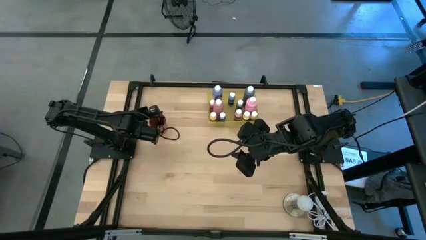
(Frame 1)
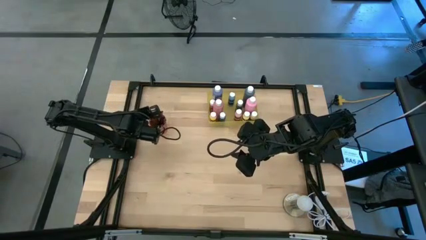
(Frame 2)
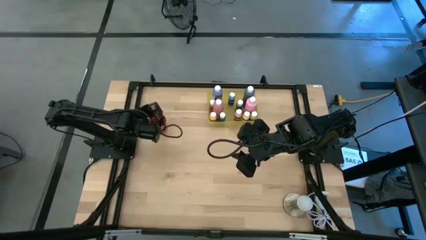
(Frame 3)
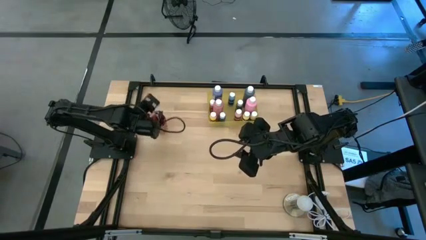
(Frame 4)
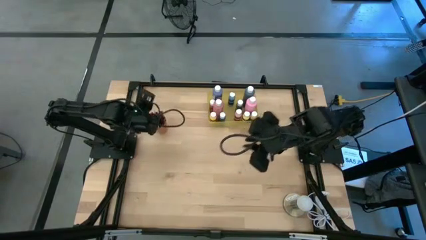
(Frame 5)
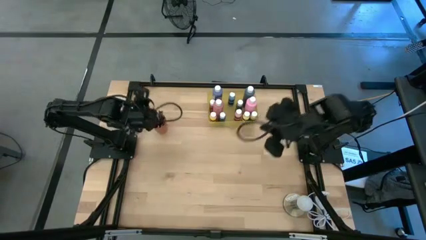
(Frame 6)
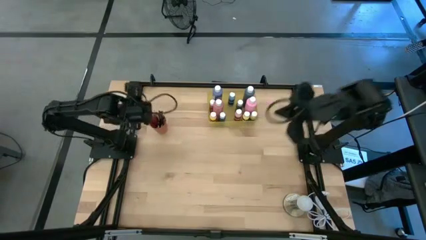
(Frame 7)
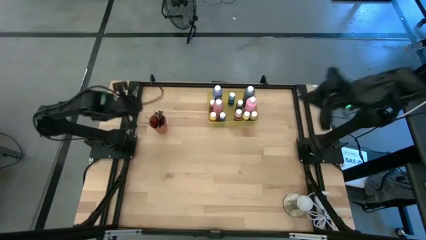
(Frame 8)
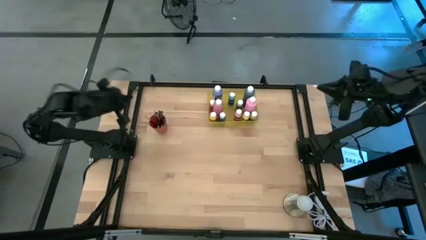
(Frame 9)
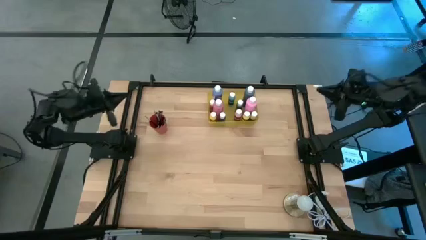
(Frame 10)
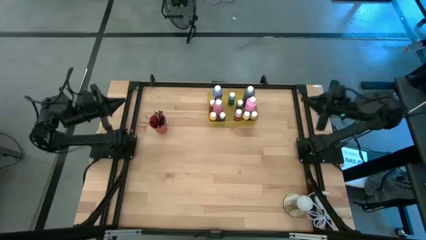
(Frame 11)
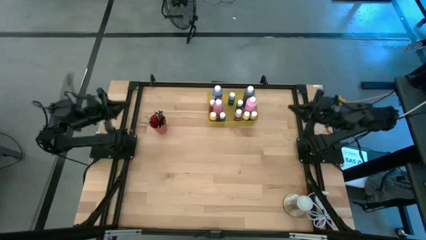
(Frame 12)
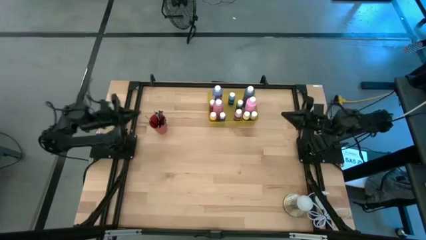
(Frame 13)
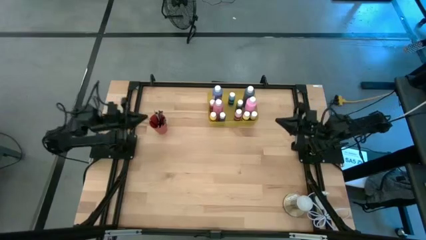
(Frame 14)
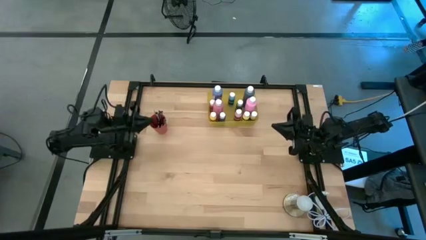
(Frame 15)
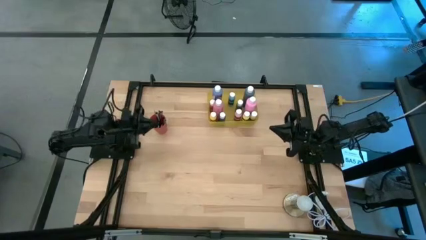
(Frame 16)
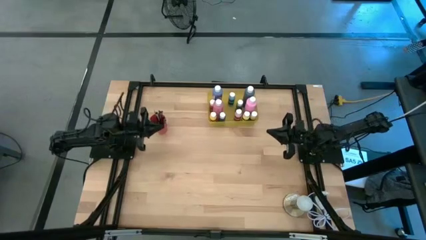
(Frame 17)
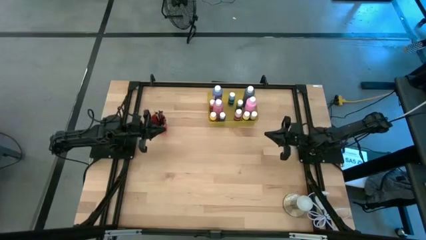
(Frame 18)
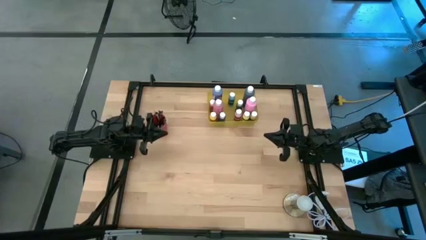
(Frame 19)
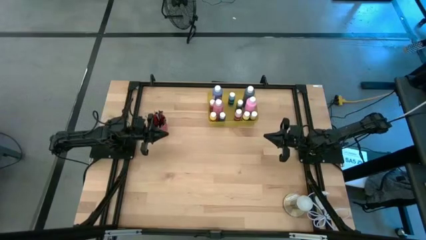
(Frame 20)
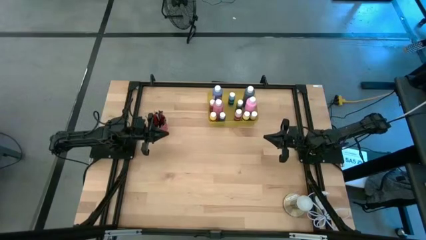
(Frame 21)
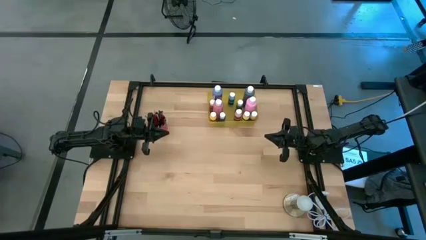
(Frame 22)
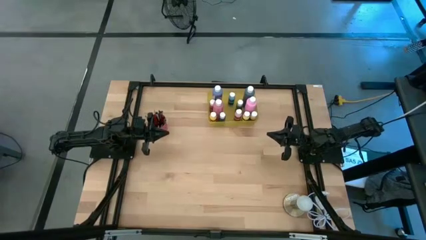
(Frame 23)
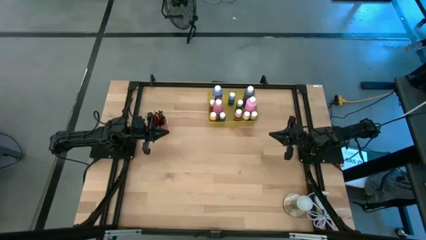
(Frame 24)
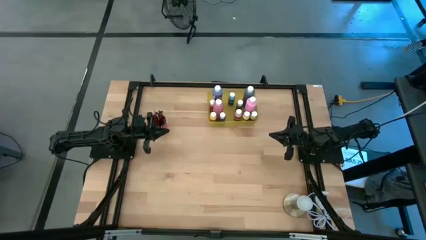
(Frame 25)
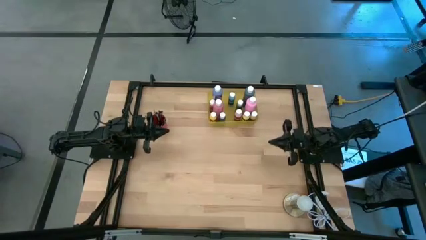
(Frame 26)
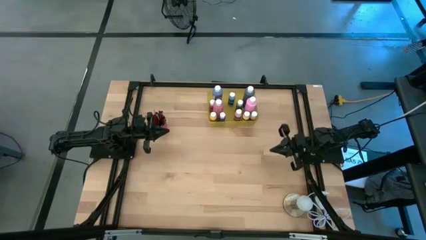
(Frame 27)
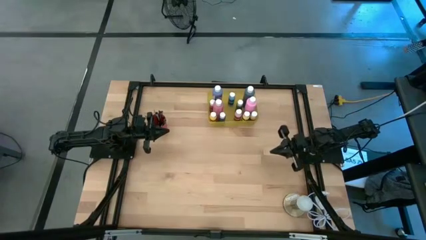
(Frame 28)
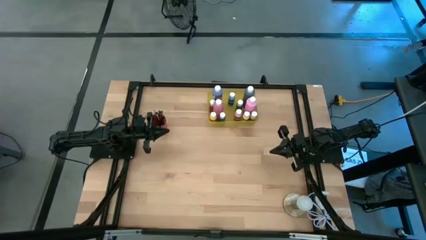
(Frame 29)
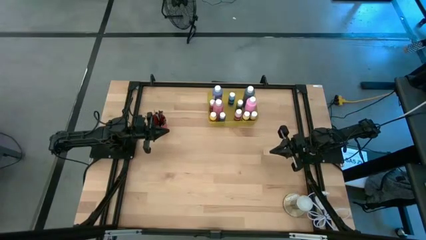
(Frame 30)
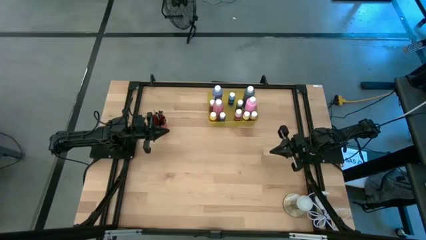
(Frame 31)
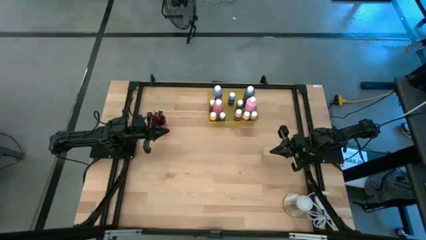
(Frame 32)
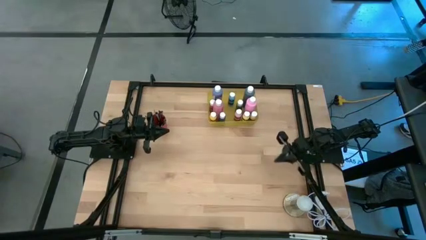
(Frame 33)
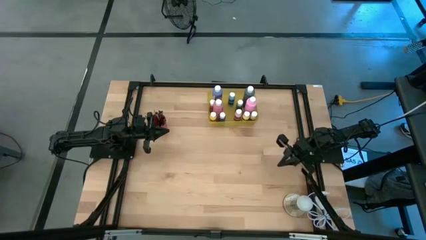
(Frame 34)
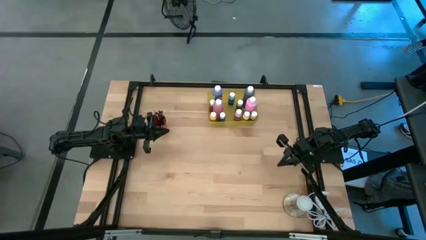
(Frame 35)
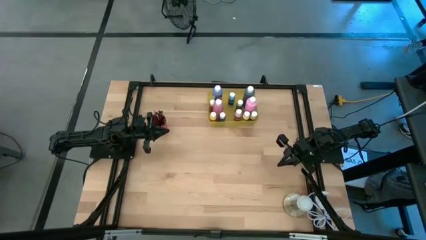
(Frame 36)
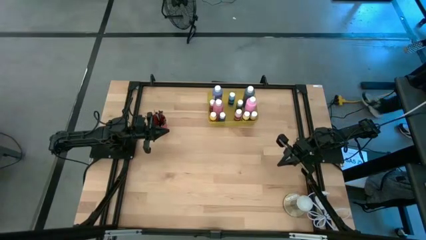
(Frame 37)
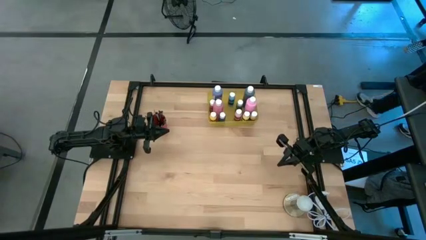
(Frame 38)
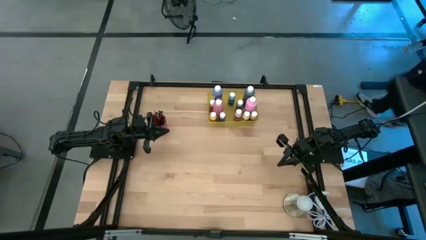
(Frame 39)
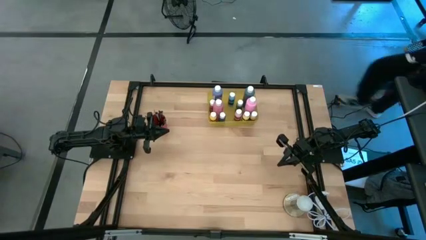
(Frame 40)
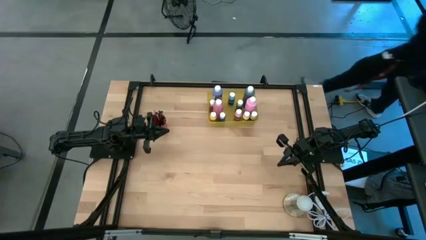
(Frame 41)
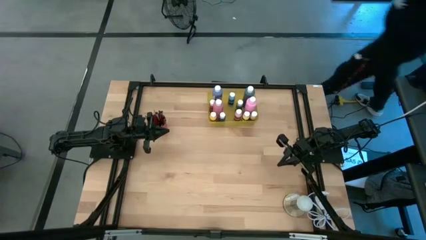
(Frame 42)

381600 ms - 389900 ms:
Task: Pick & Place Paint Supplies
Return to Home Position

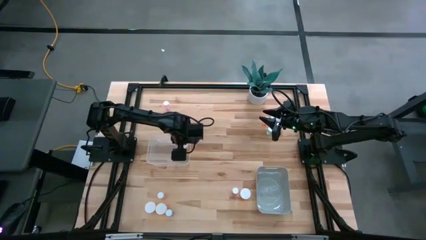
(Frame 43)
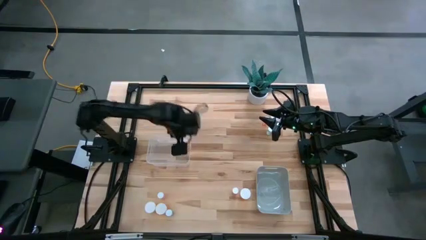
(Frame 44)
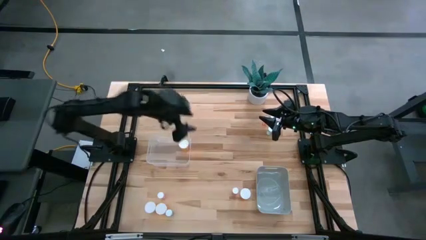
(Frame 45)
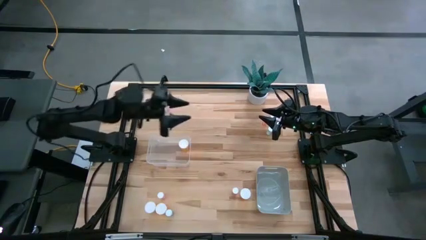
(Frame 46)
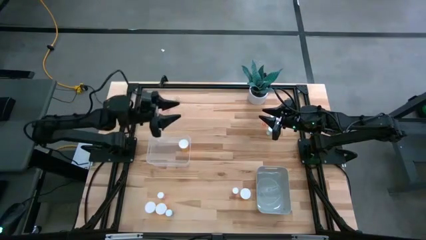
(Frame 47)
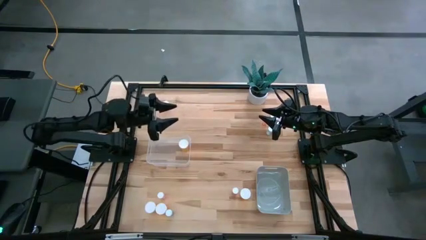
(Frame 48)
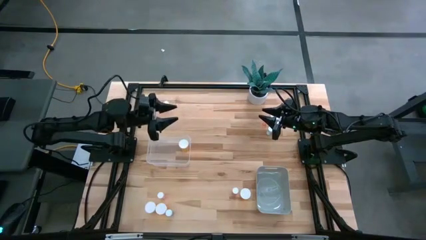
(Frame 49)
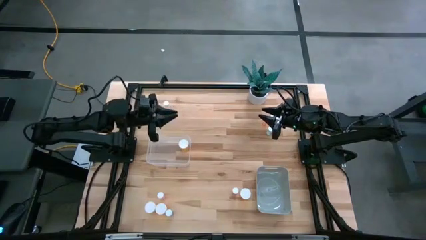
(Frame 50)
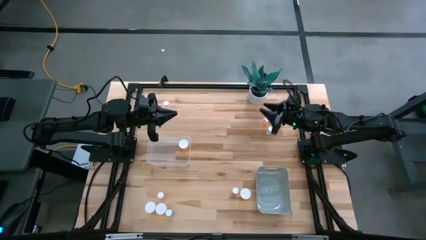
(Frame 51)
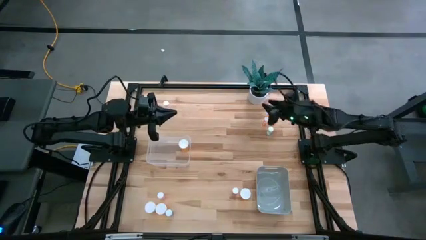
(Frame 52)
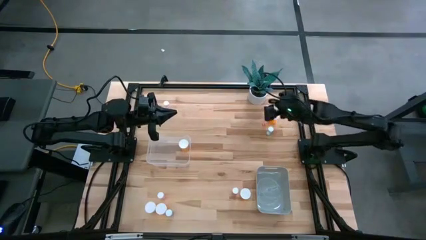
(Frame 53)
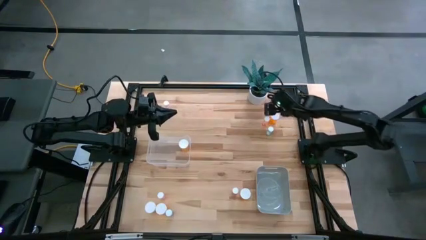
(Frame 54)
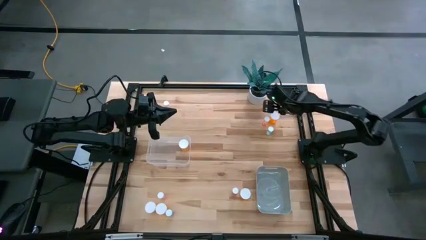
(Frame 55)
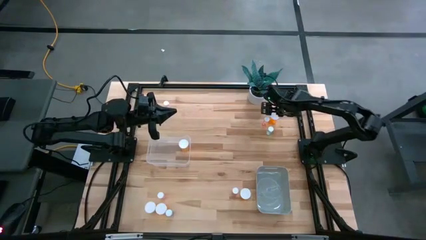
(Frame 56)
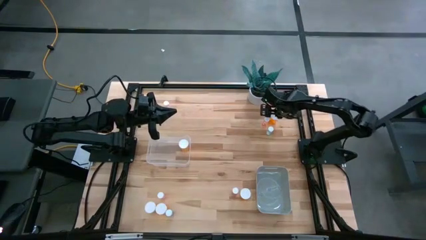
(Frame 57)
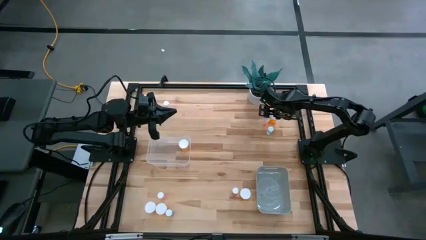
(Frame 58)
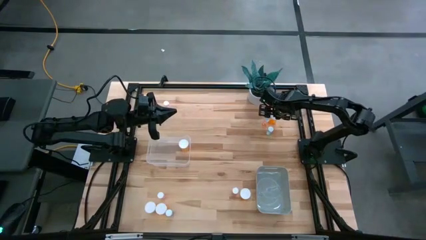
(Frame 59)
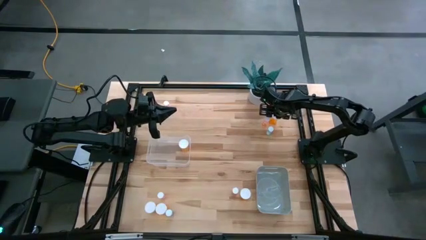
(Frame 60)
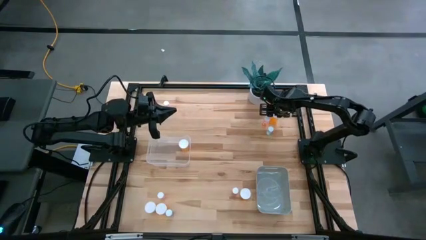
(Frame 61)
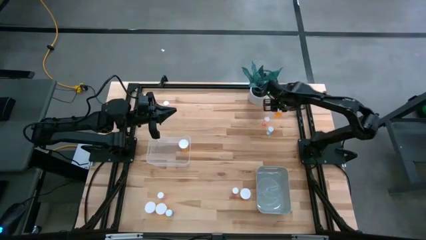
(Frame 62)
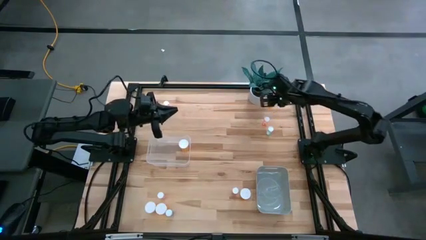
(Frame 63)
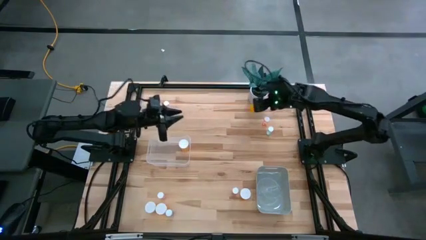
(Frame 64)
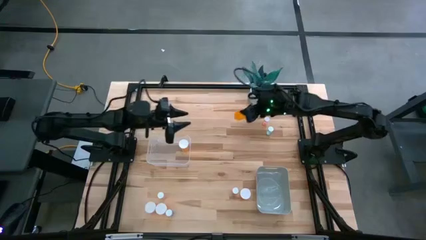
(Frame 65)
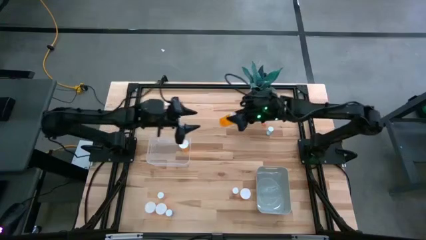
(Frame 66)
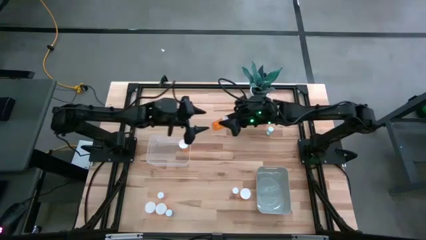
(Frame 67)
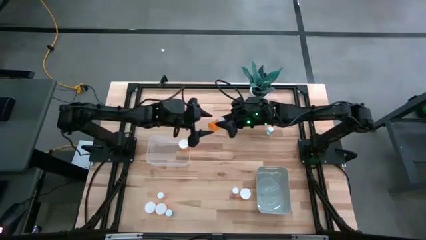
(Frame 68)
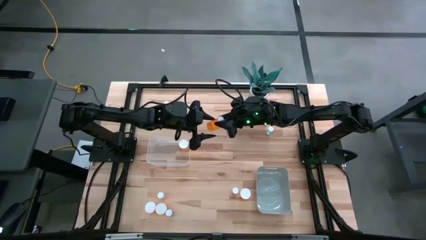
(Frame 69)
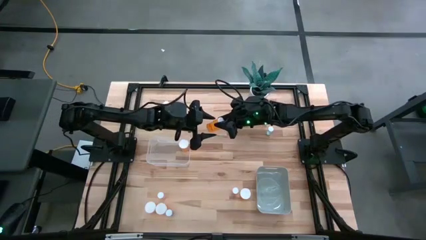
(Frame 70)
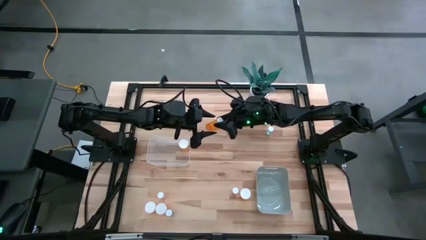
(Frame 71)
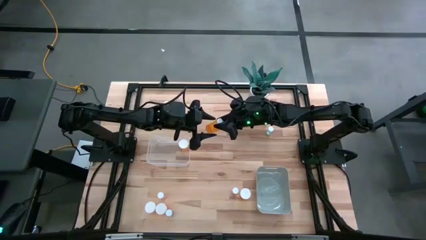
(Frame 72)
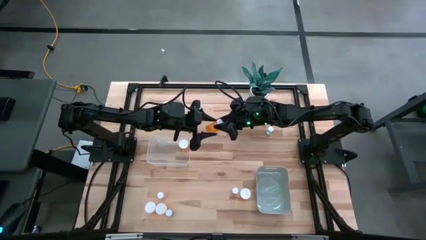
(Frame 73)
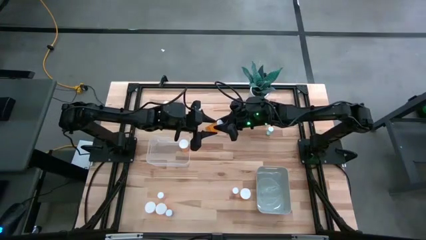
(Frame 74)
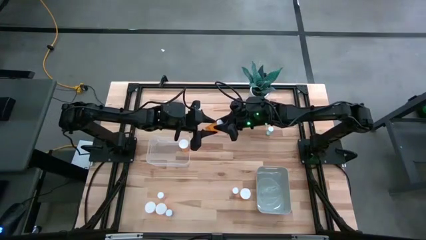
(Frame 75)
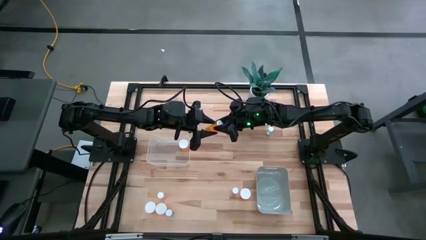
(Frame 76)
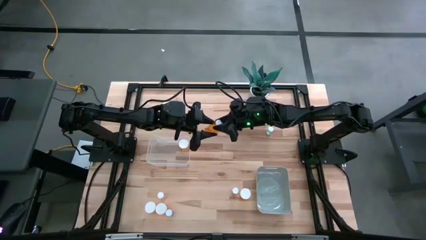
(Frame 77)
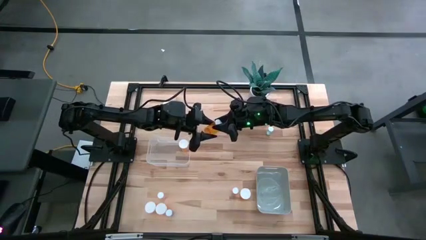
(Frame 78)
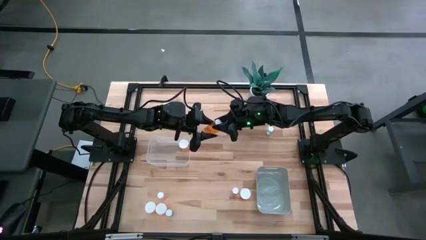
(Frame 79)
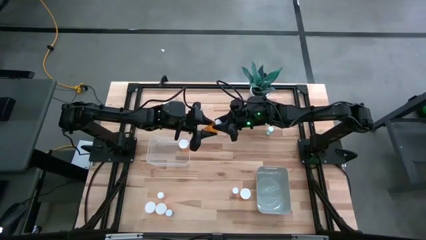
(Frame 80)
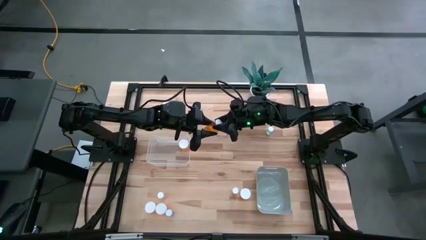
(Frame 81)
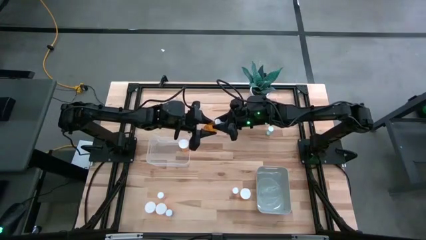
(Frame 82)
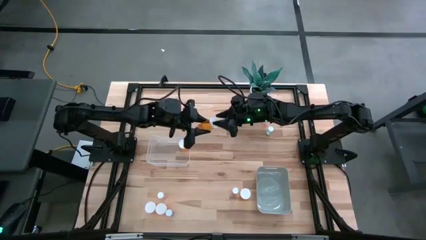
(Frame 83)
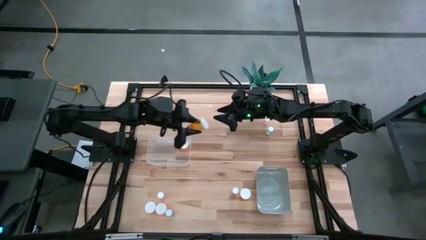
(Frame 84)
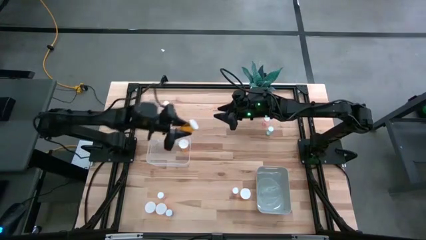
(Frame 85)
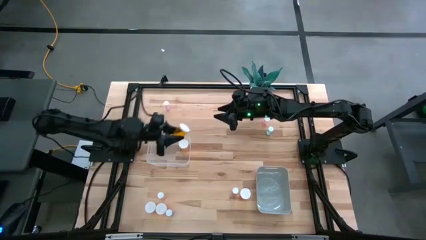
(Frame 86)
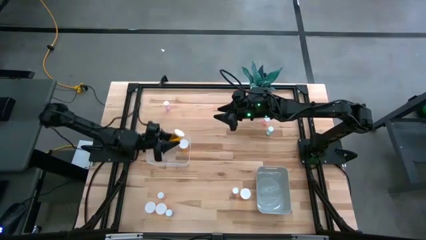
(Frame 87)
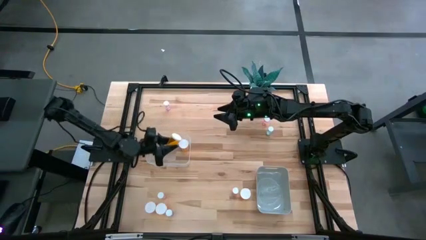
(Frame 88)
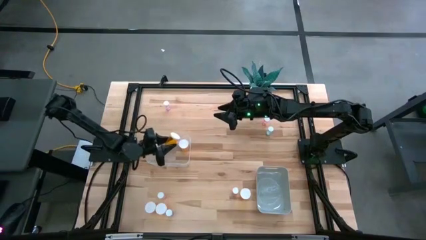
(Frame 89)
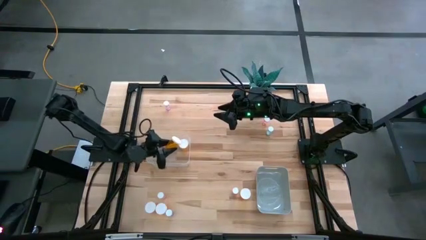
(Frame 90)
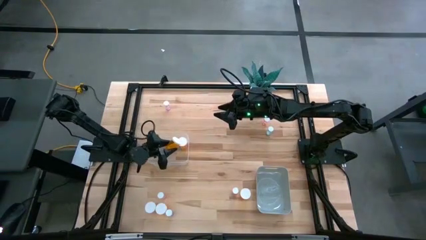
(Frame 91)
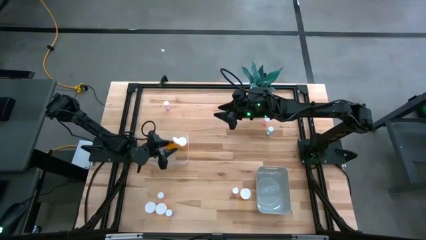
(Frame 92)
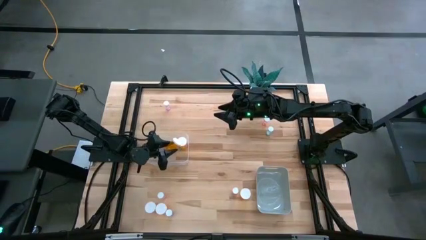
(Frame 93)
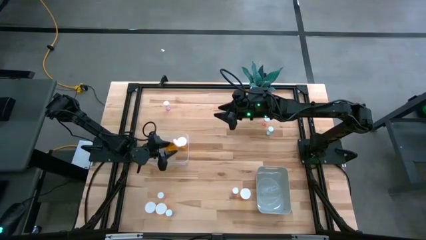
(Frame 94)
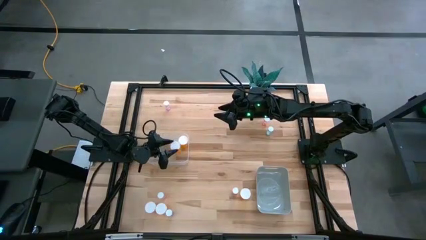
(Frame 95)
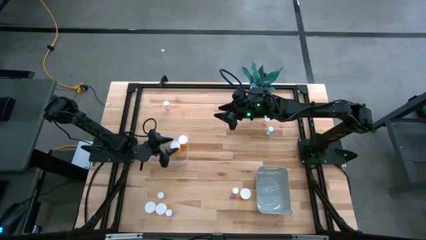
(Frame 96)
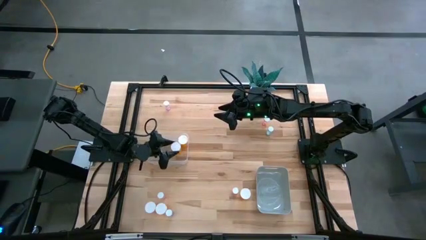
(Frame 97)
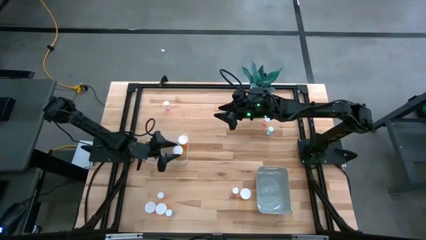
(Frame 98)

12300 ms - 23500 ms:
Task: Pick and place medicine bottles into bin by pill shape (circle, oval)
Put the large orange pill bottle into the transparent bin
